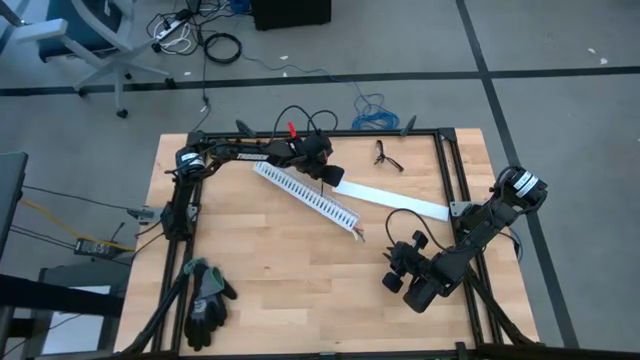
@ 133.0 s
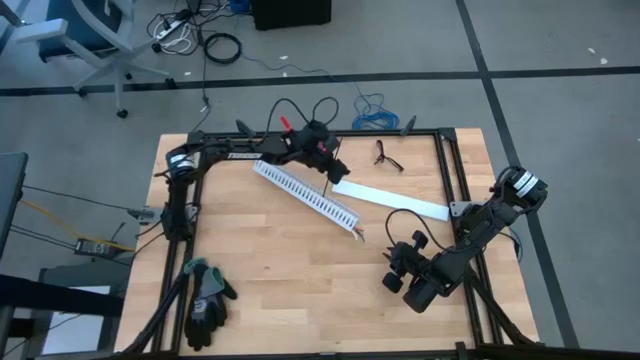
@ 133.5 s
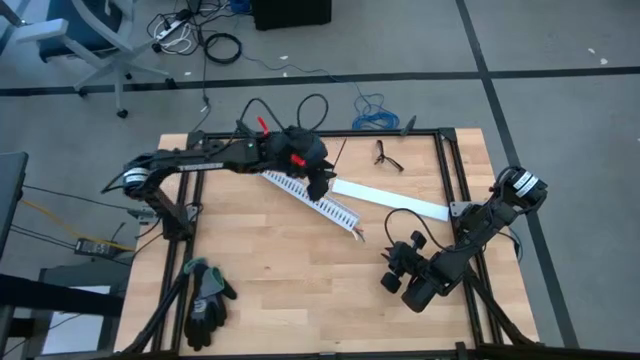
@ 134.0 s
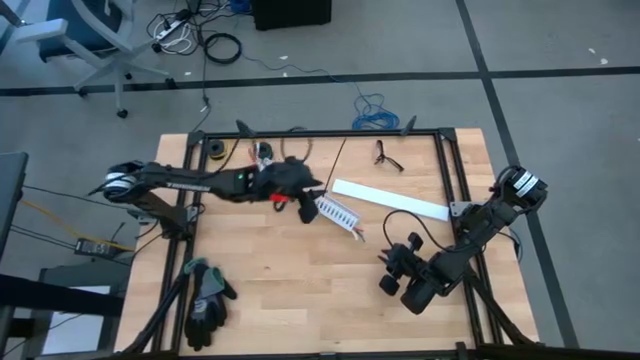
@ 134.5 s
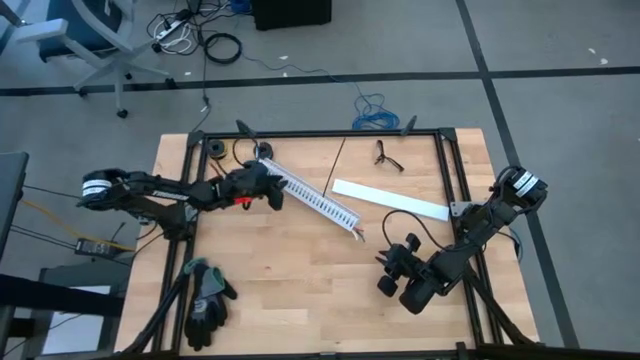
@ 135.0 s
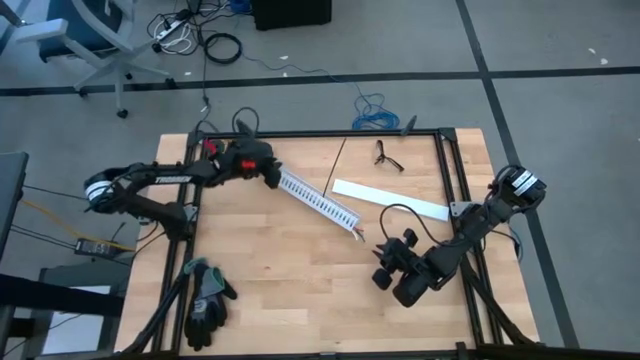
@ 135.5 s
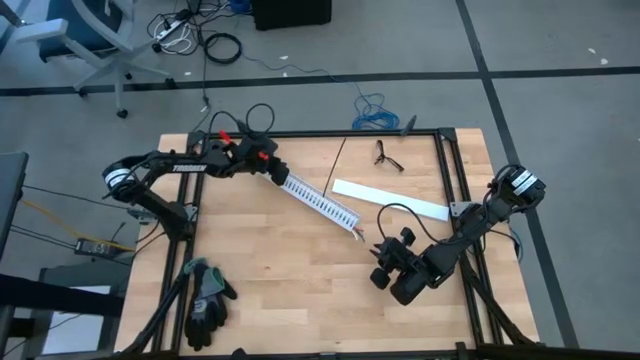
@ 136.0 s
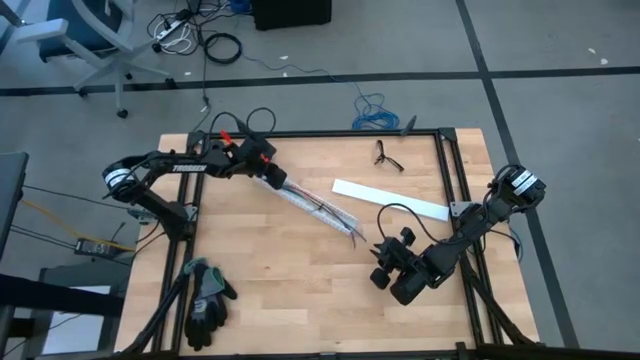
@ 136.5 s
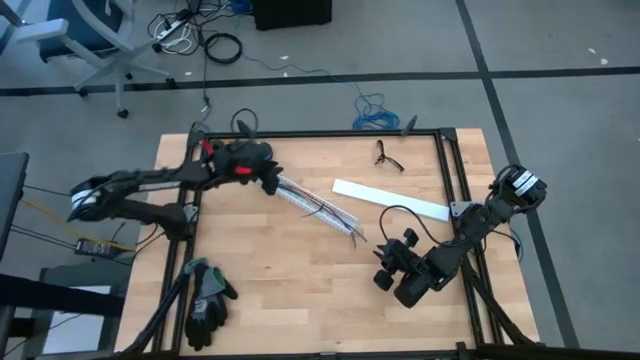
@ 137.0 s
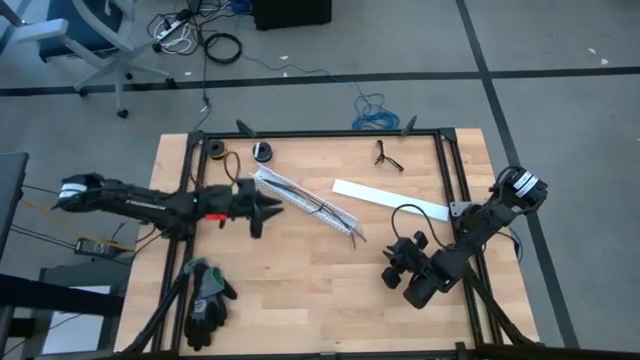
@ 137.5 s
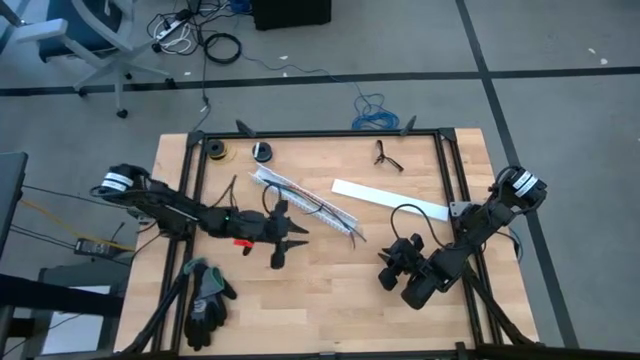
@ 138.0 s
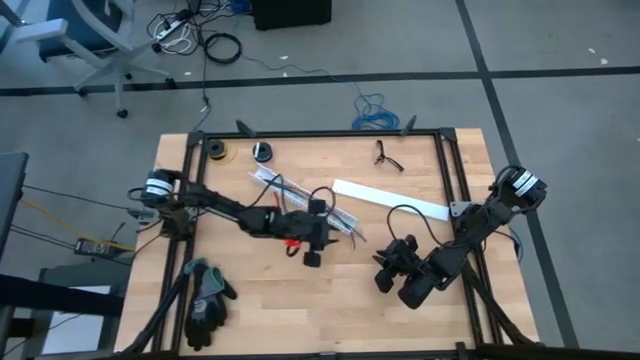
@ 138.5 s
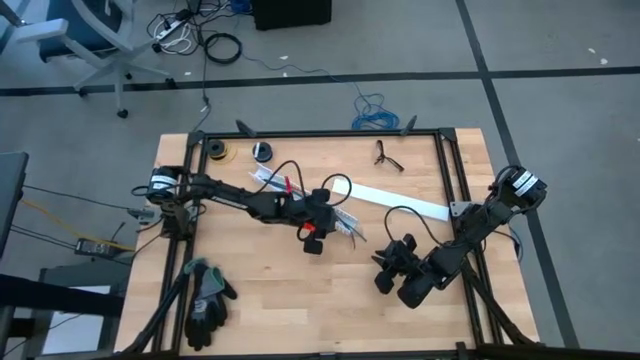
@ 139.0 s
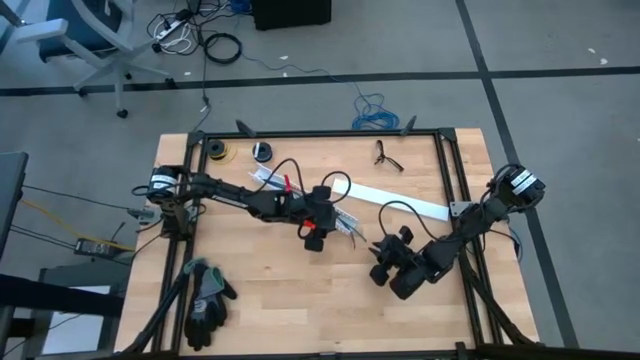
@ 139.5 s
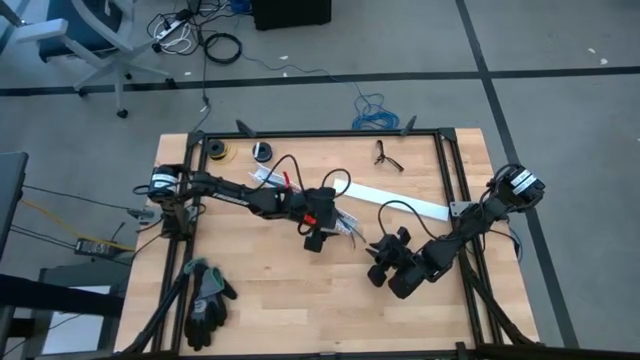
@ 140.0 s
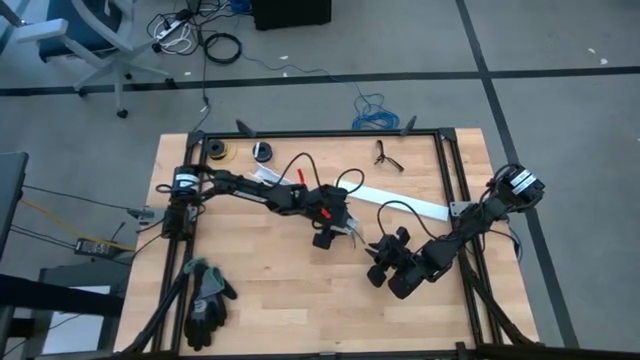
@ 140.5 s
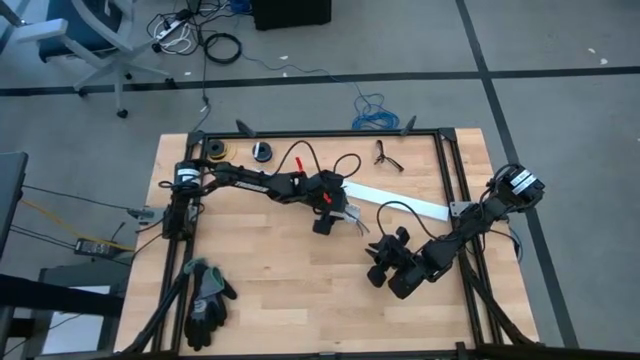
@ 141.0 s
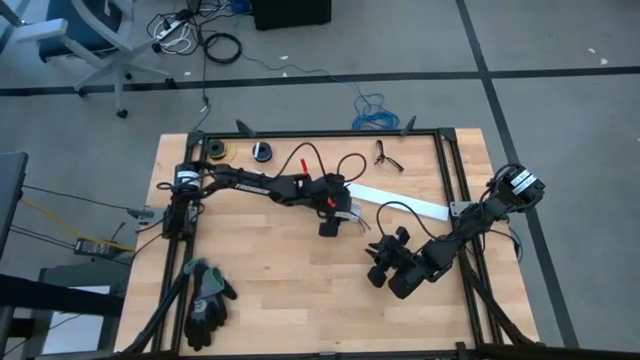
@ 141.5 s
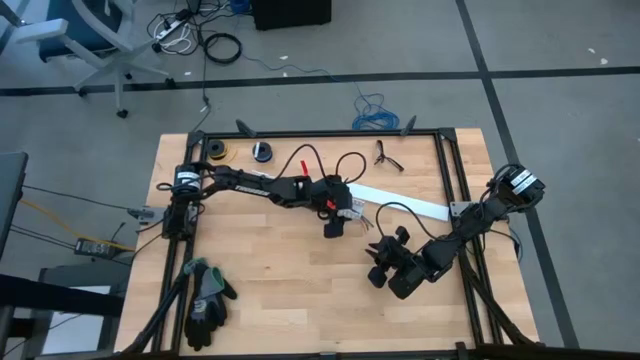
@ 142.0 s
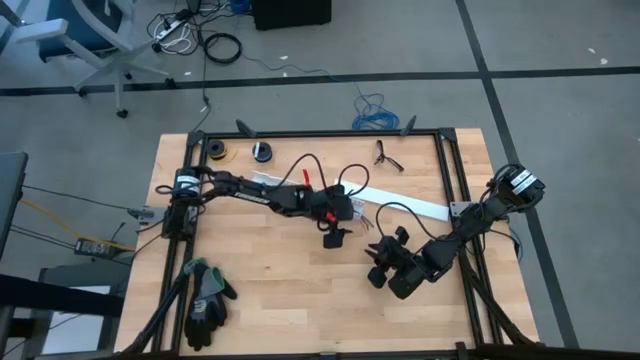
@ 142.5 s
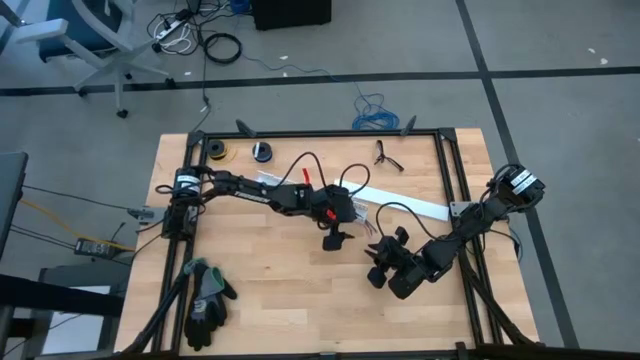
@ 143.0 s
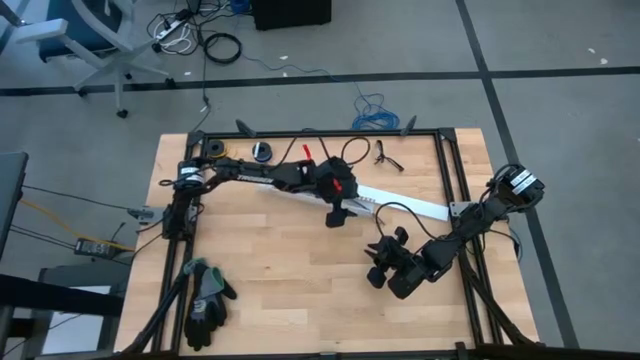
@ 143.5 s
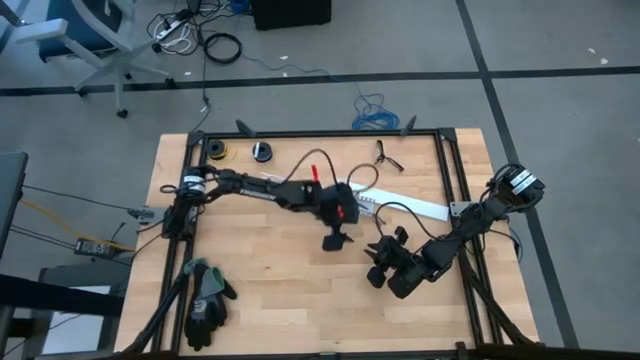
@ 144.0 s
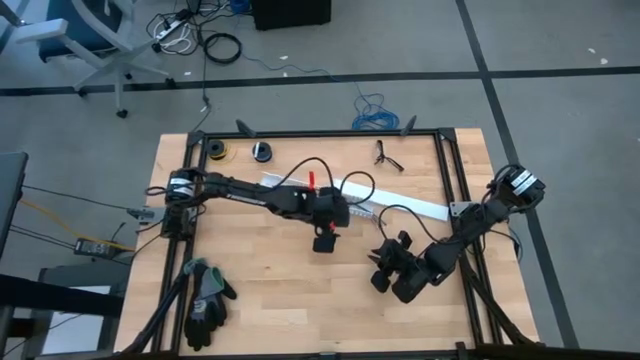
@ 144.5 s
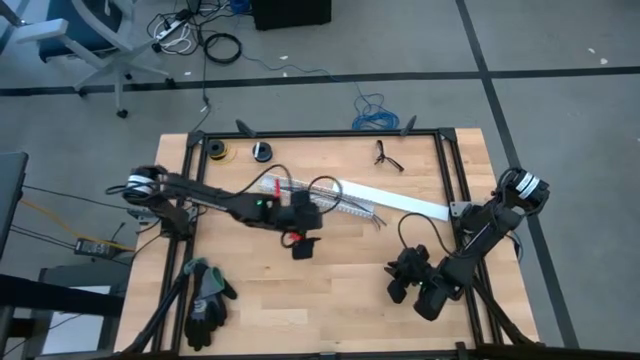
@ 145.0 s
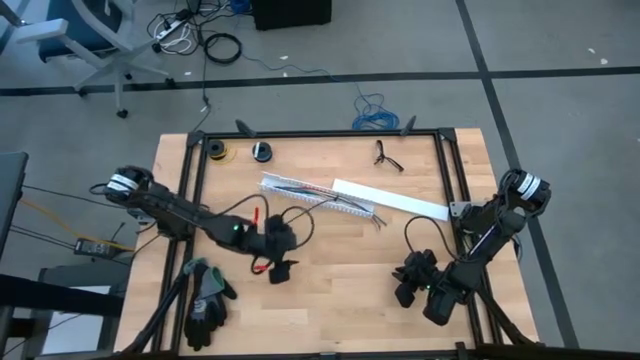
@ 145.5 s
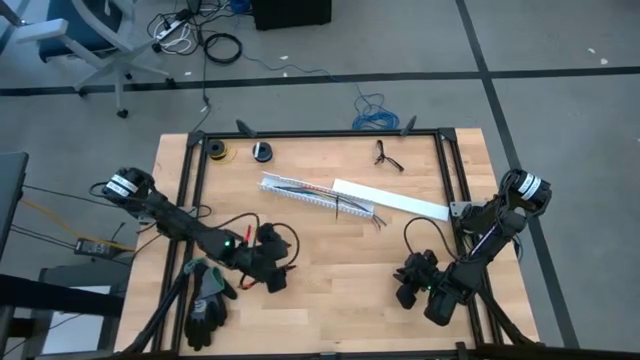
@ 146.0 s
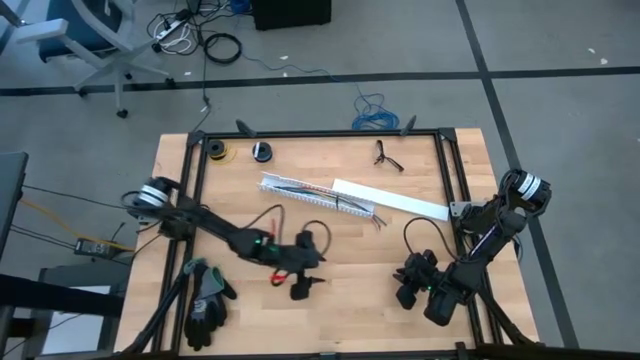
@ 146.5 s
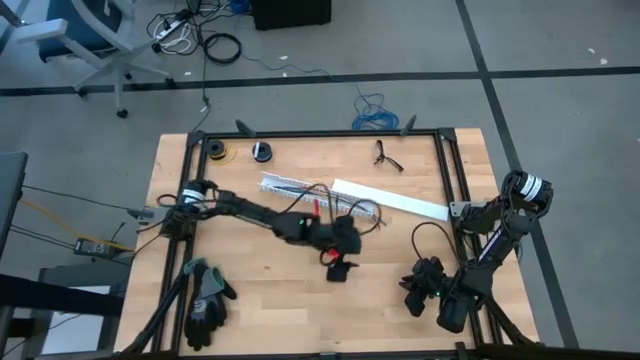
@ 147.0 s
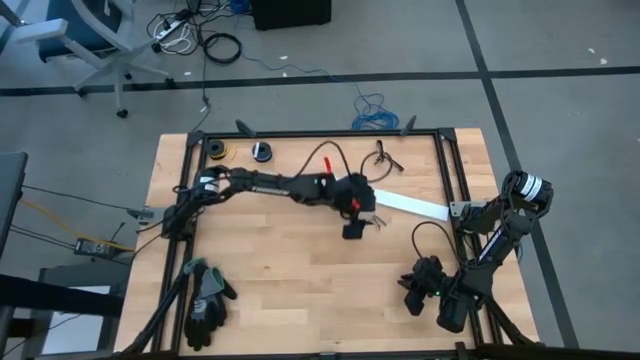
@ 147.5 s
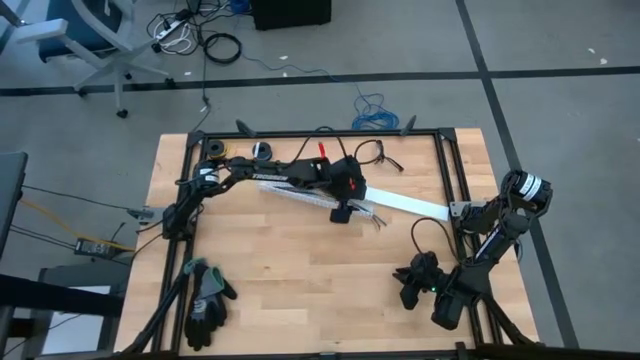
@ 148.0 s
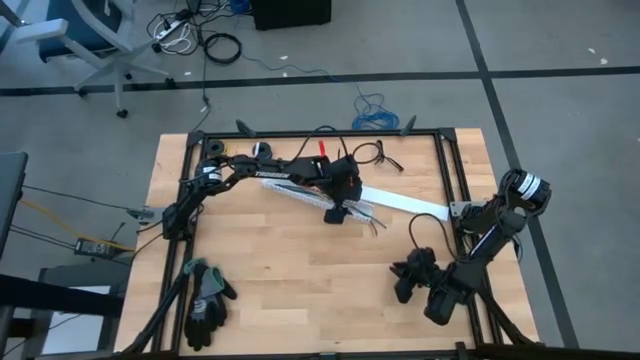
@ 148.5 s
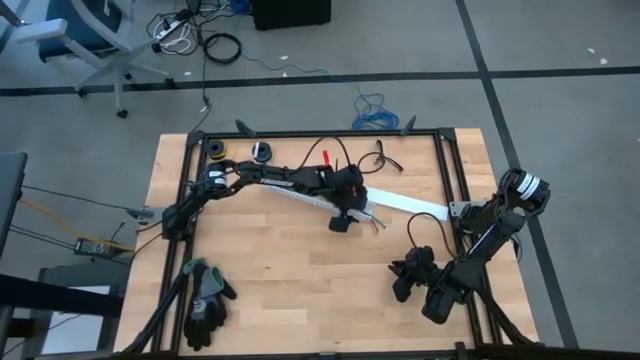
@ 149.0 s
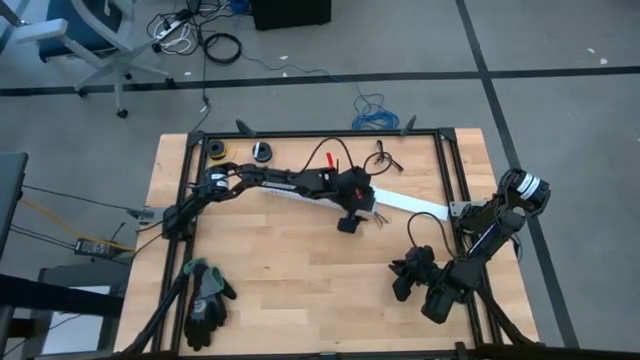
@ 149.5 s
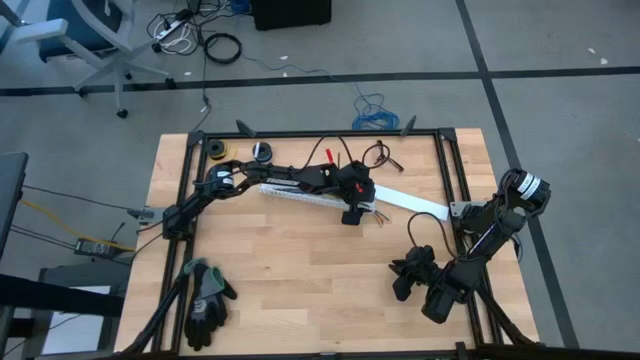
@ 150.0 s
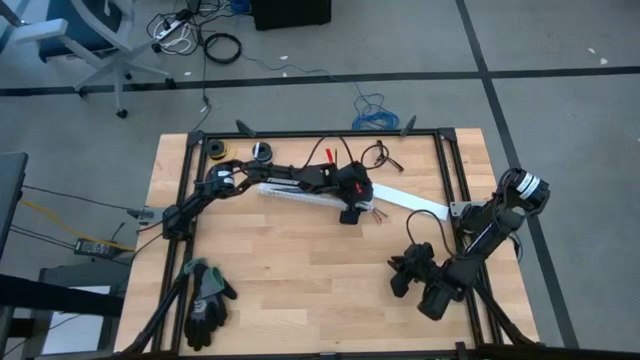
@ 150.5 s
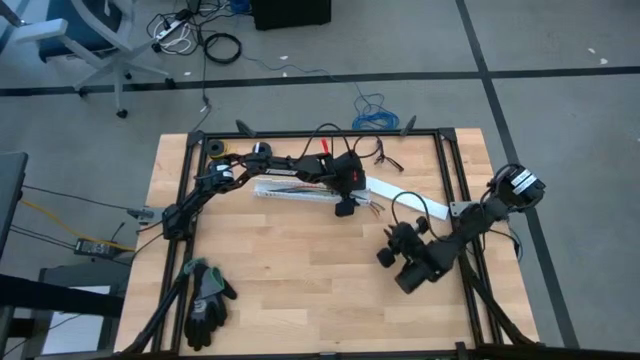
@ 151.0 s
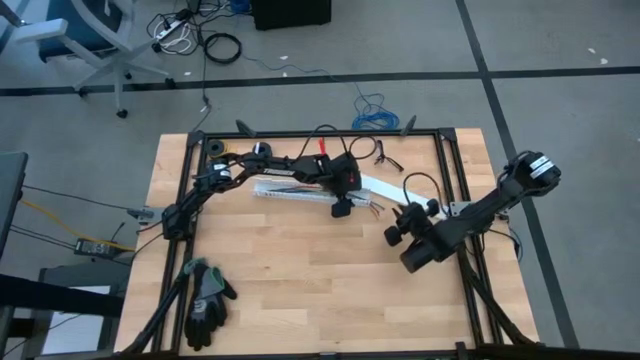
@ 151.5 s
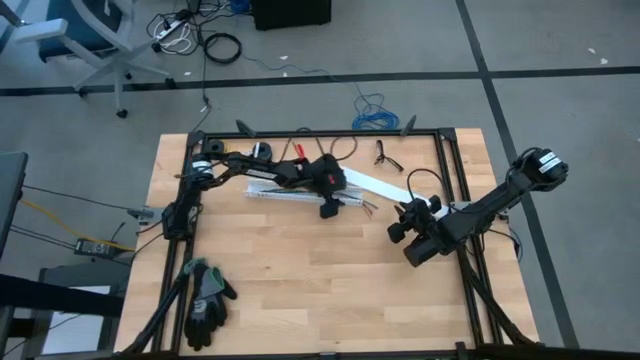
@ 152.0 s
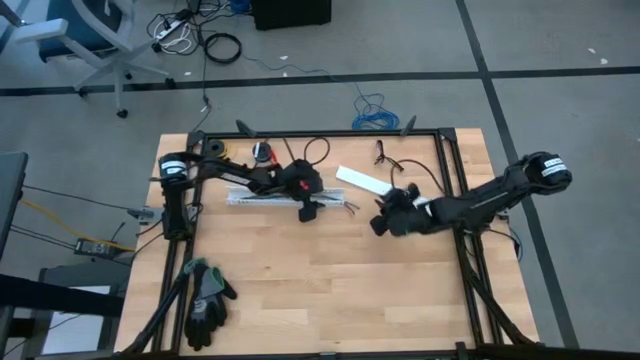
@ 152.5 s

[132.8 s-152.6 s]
Task: Ziptie cables
Close the cable duct

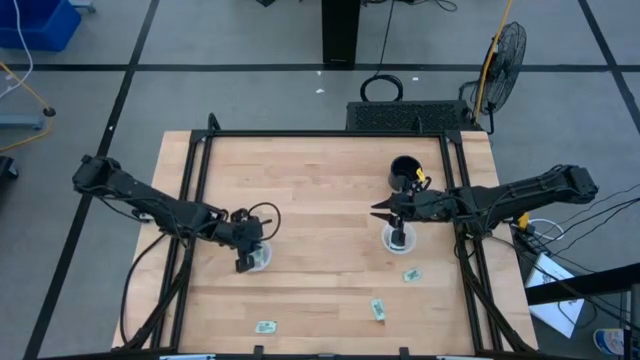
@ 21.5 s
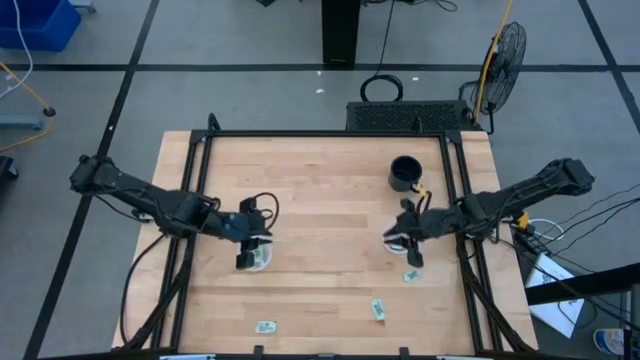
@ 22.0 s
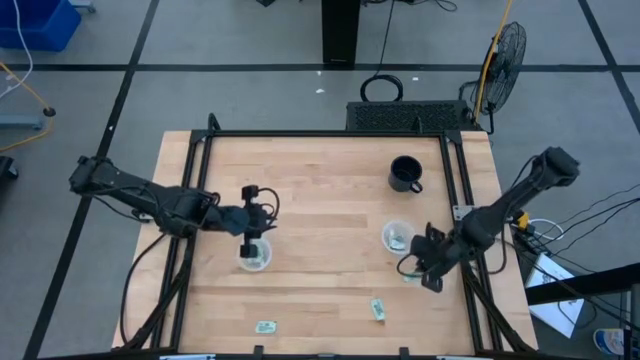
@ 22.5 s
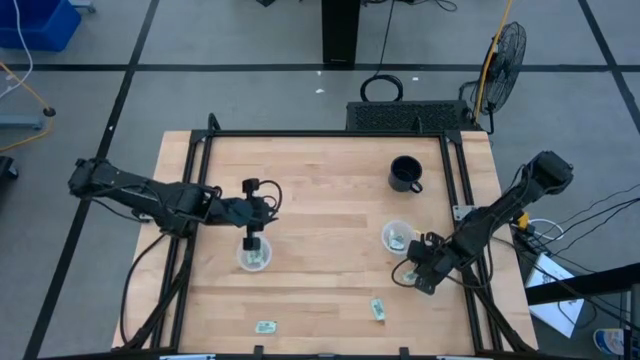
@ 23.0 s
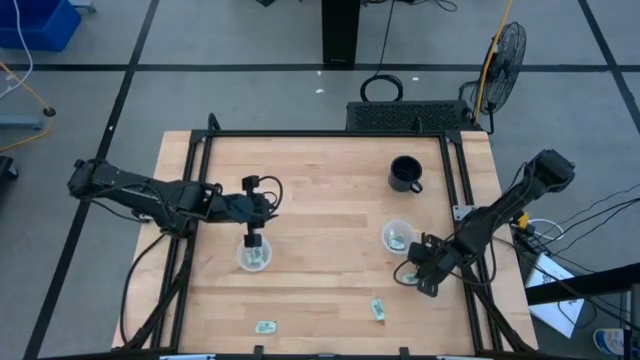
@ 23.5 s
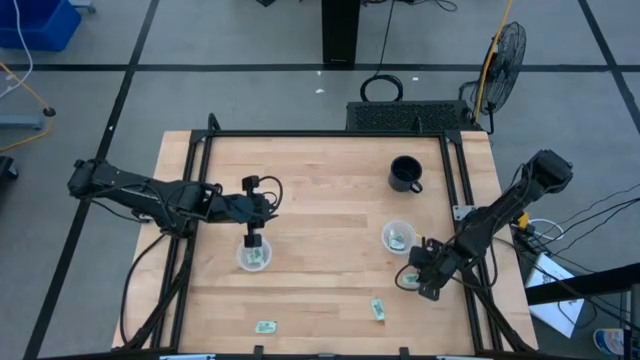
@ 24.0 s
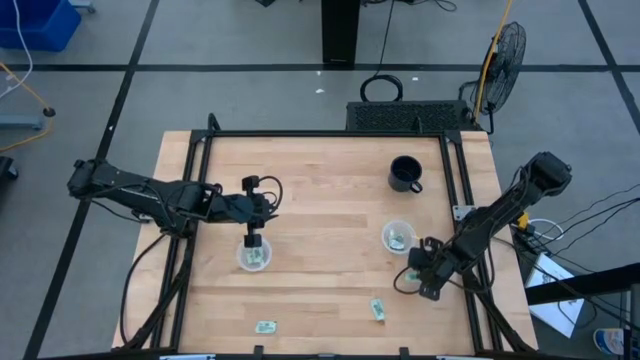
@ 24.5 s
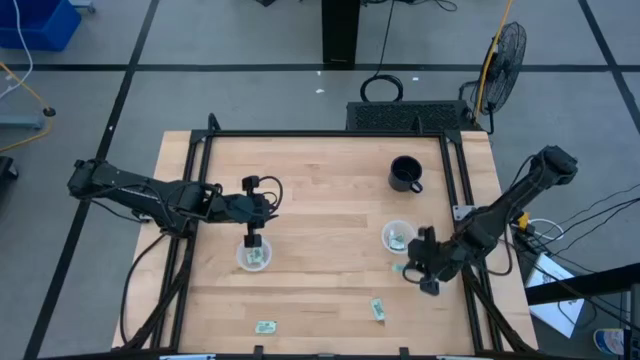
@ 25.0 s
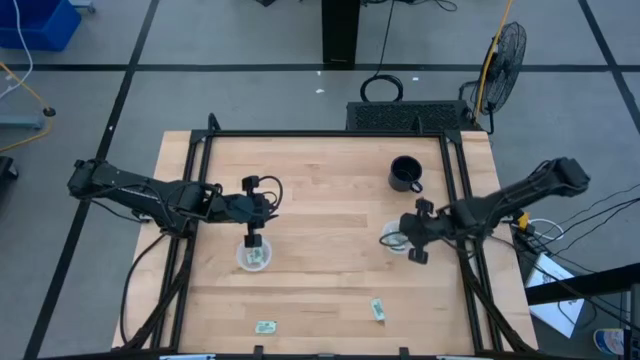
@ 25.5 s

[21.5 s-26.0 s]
Task: Pick and place items into bin
Put the white stevia packet into the right transparent bin
